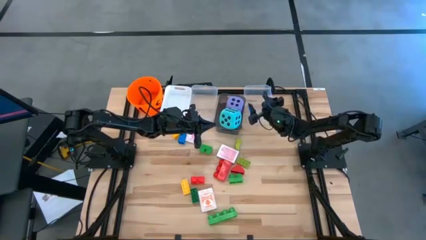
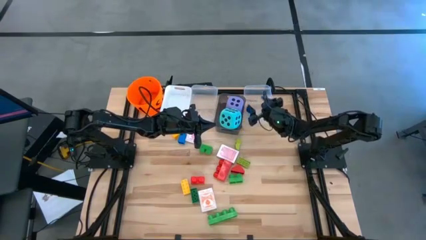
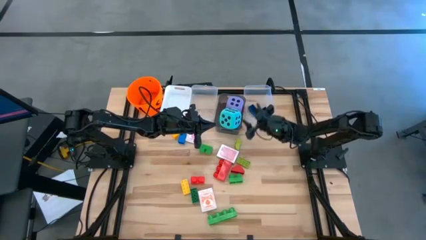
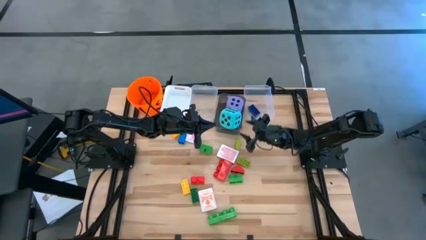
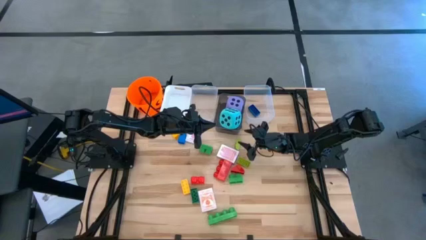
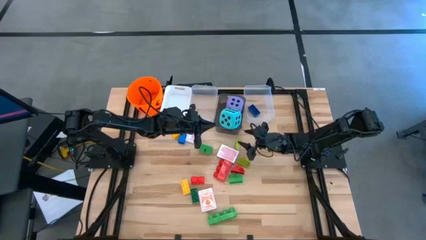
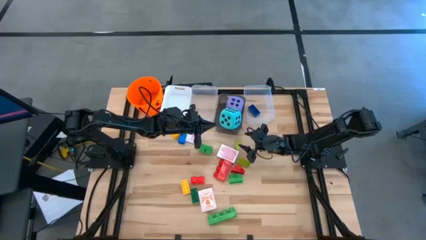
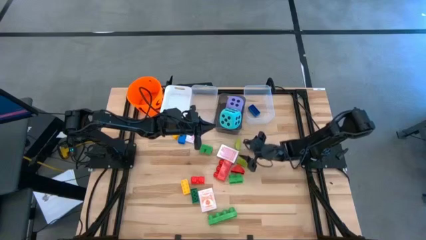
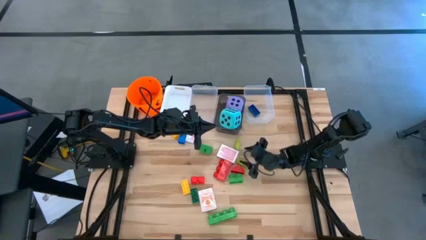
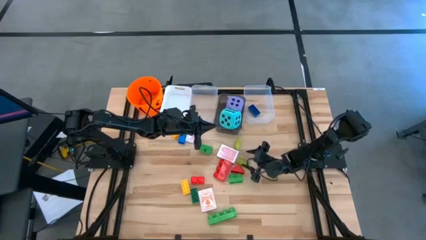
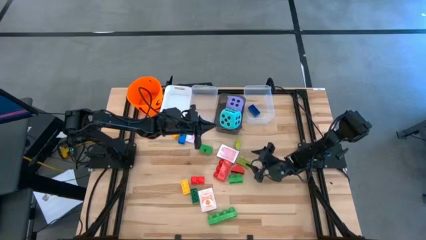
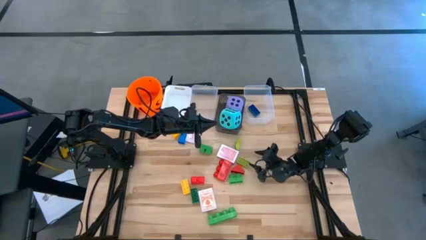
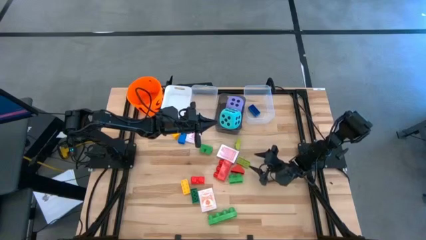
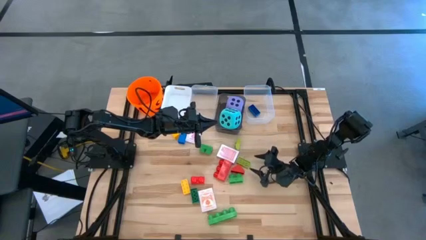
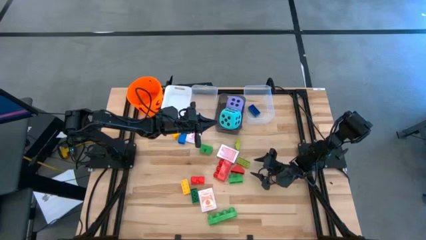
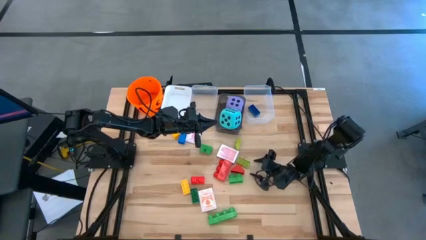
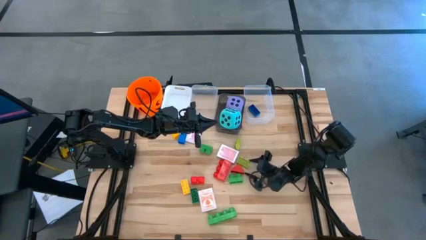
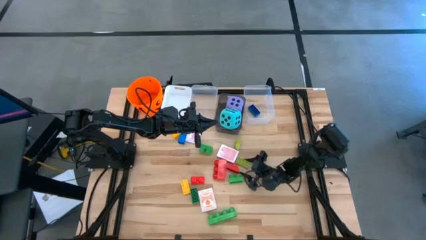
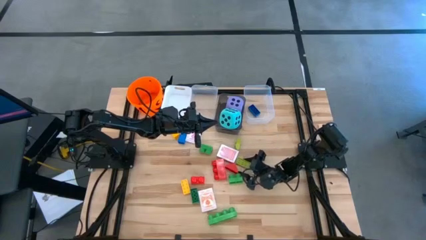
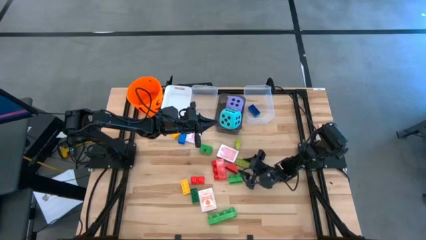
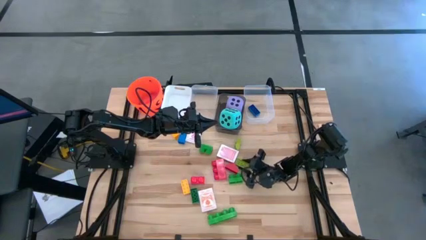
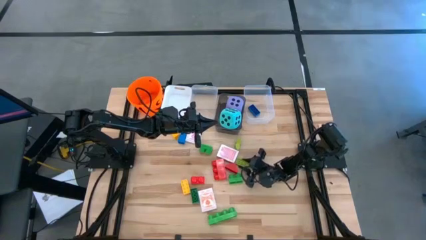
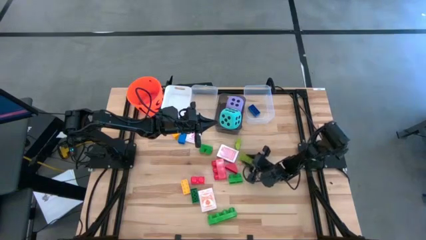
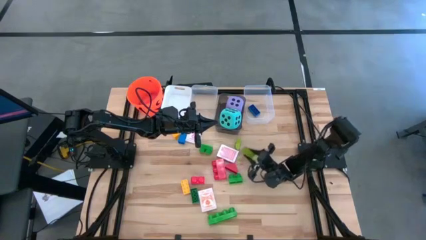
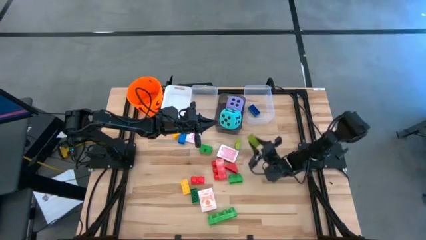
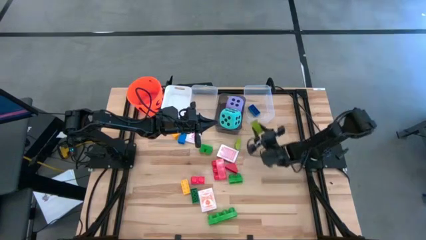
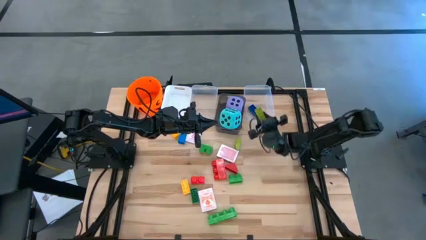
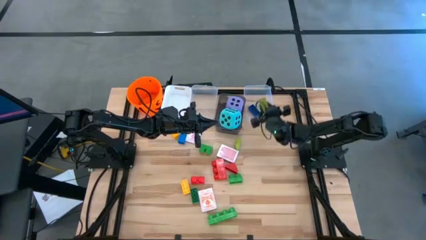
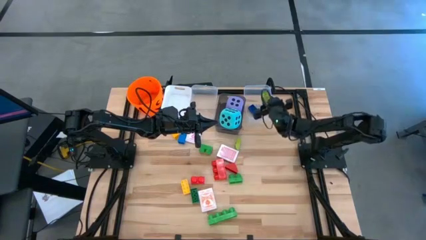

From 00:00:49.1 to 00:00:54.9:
Task: Pick & Place Toys
Put the bottom small light green game piece into the right transparent bin

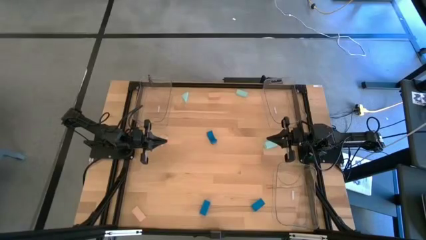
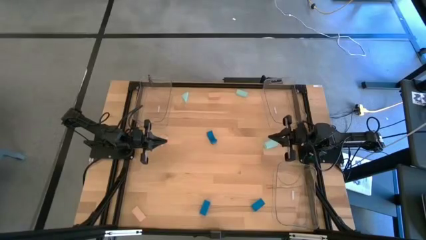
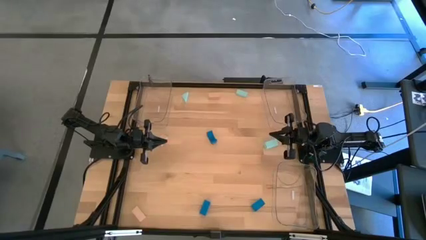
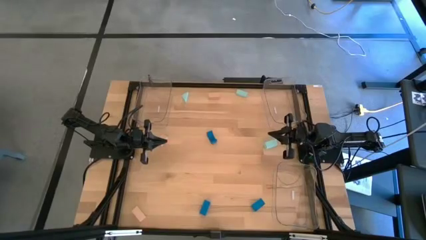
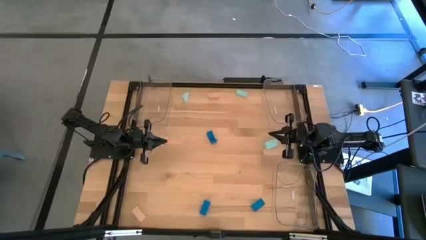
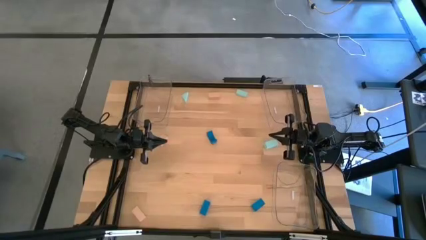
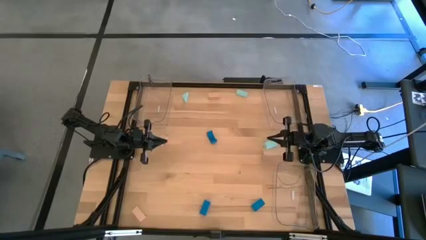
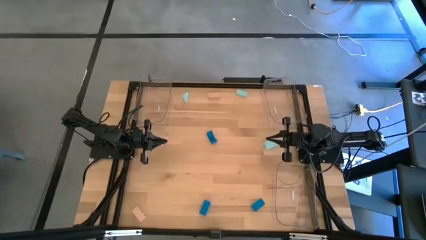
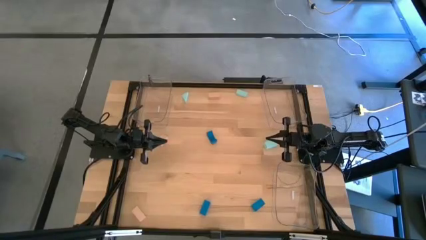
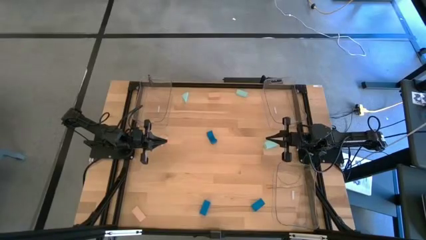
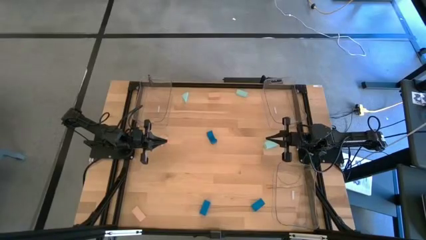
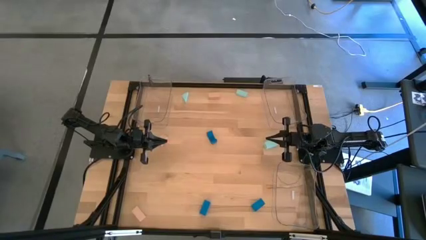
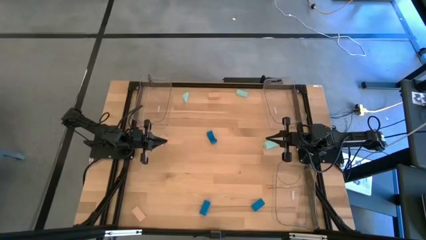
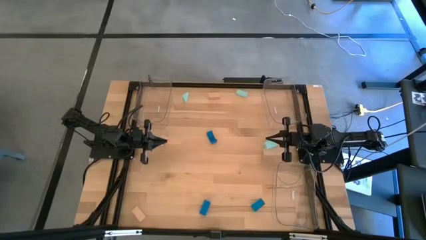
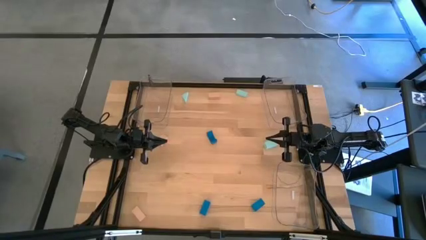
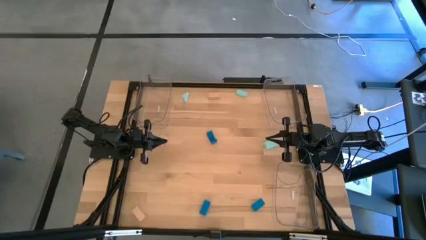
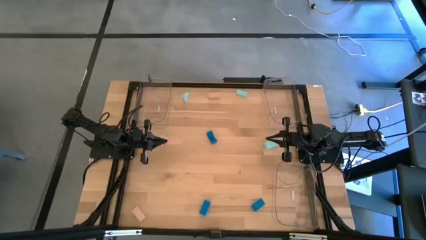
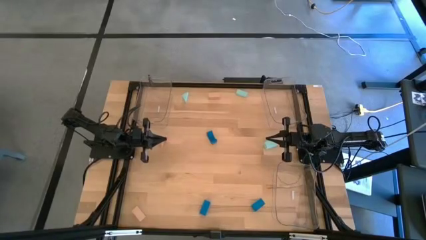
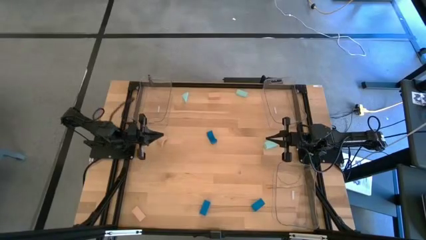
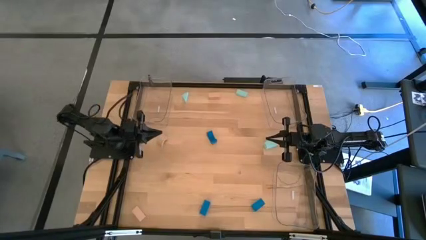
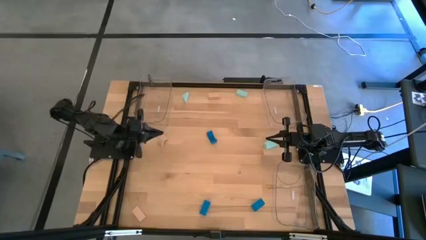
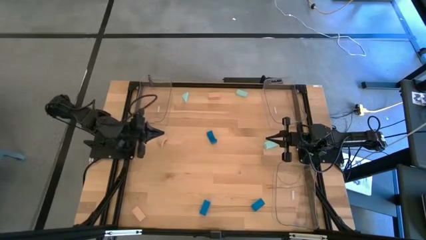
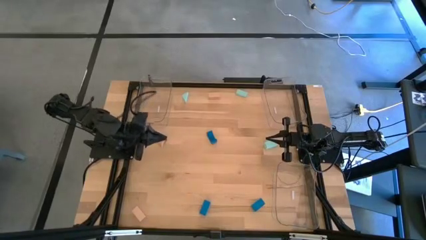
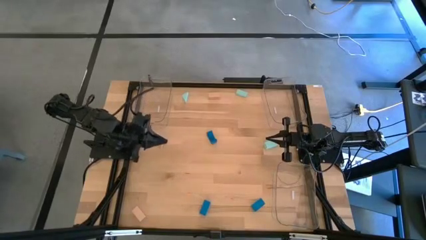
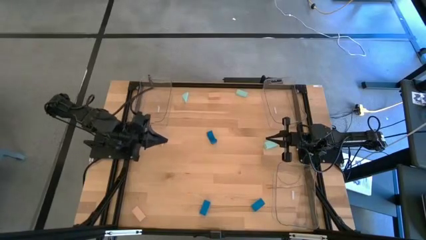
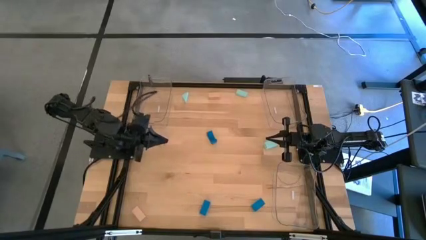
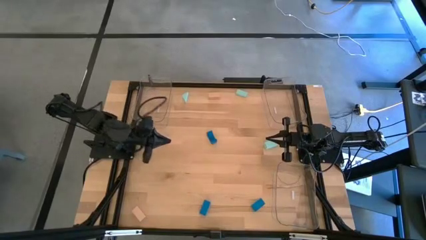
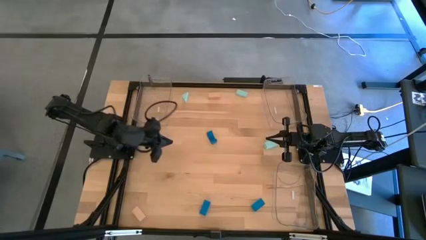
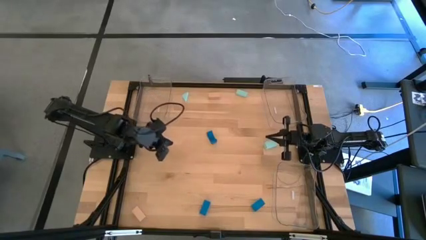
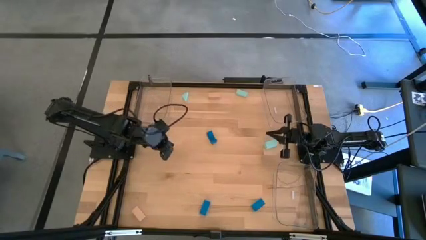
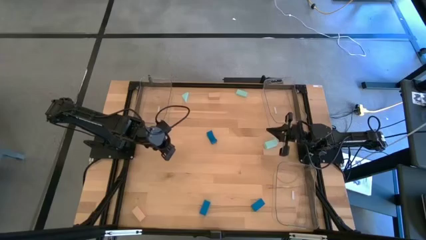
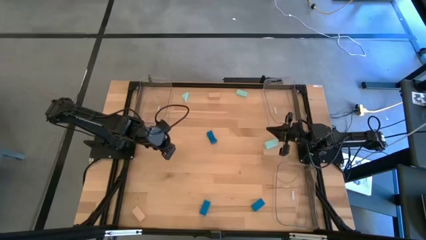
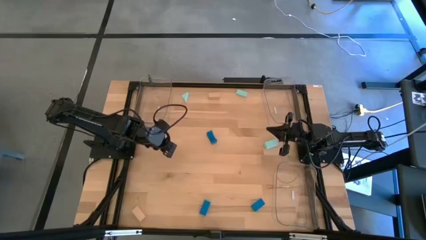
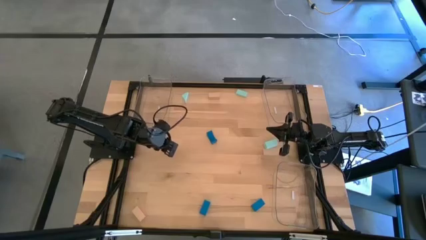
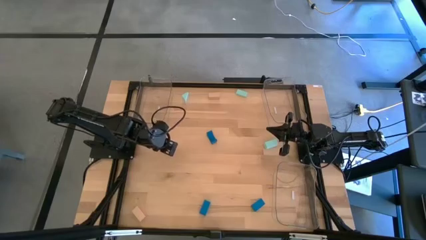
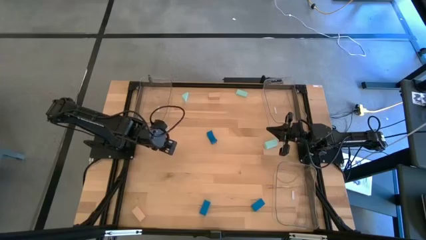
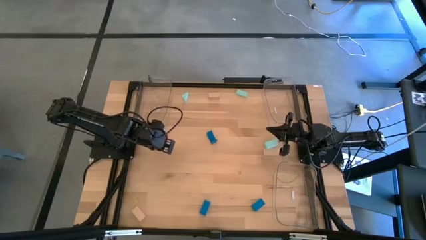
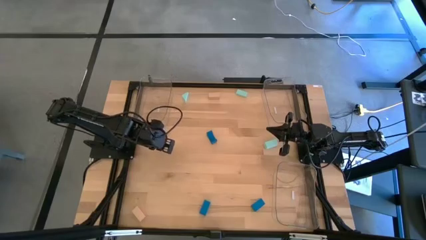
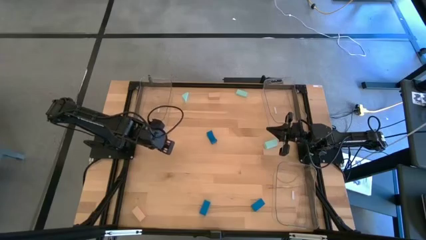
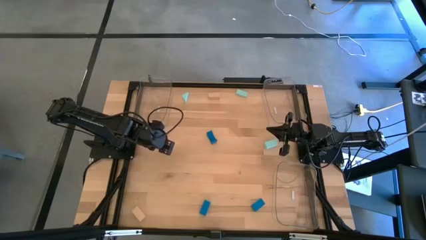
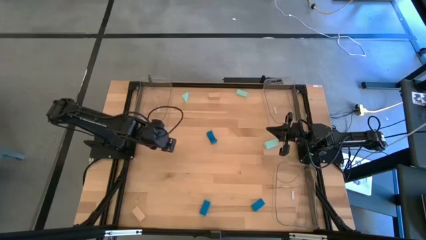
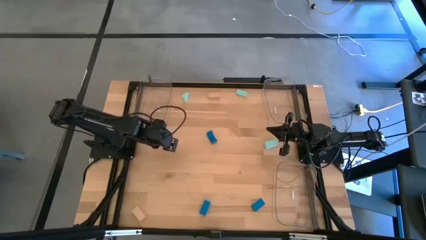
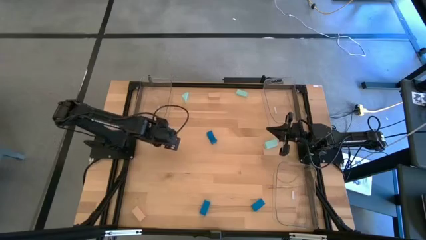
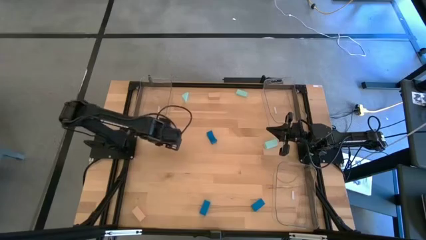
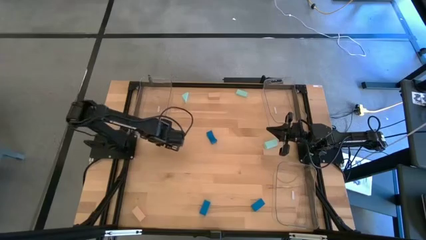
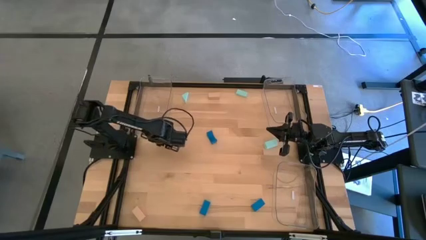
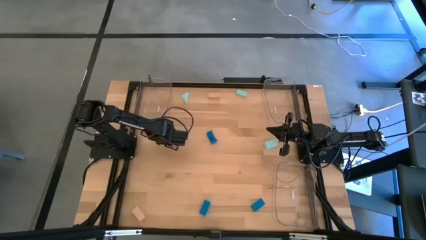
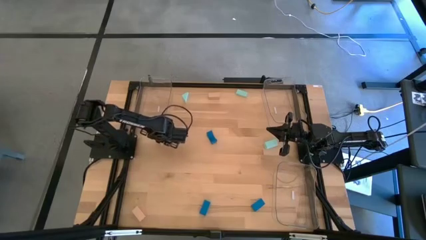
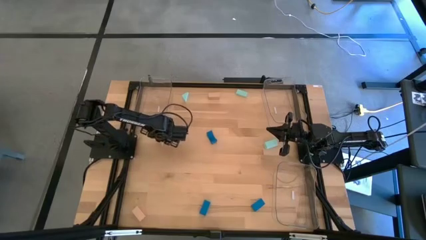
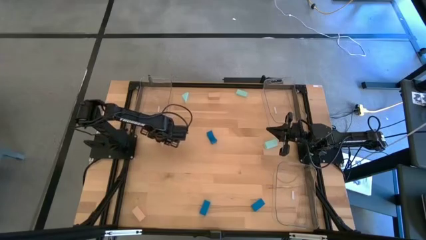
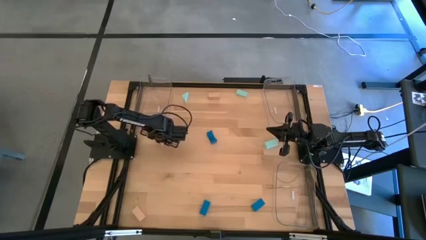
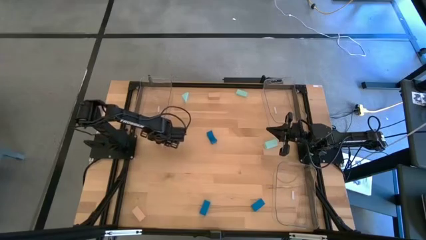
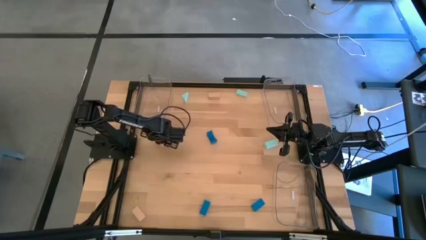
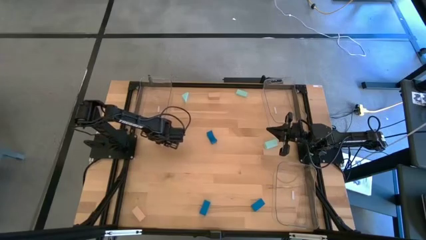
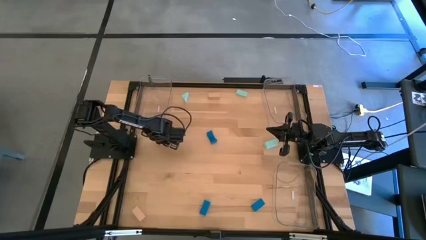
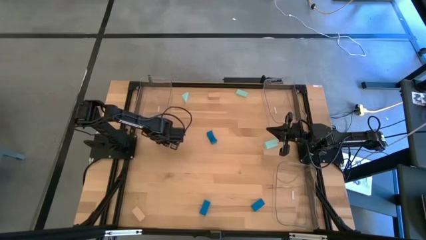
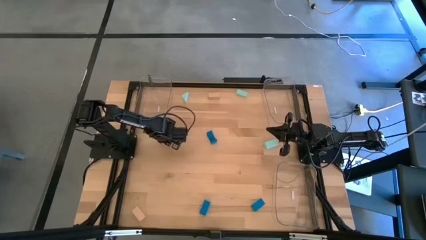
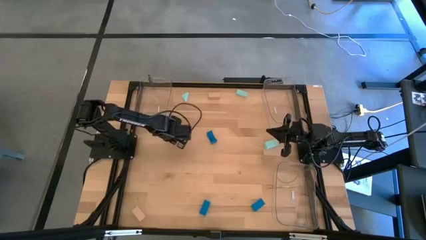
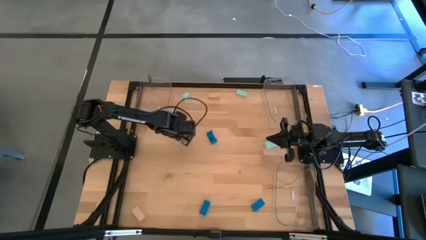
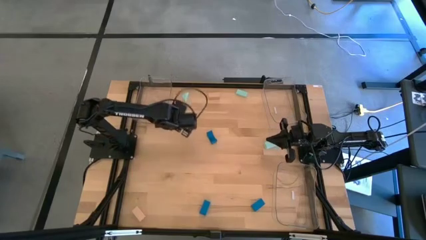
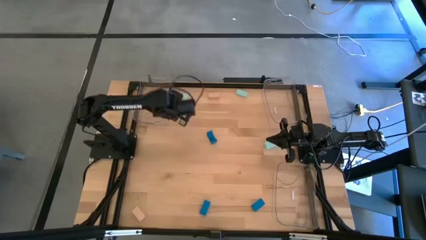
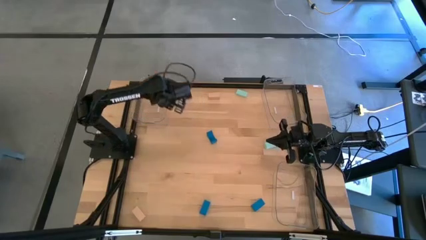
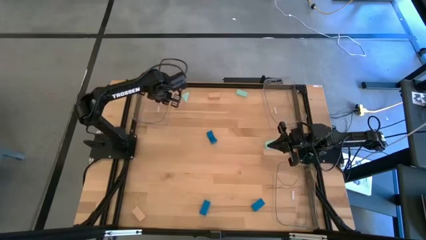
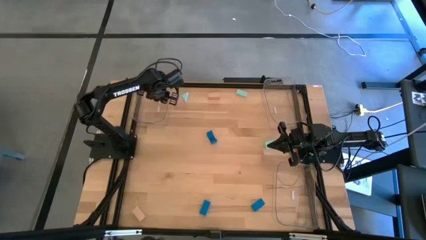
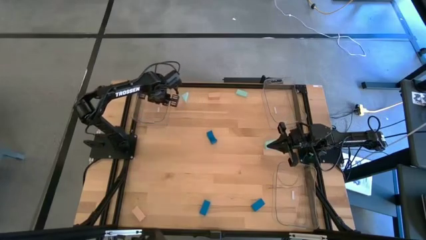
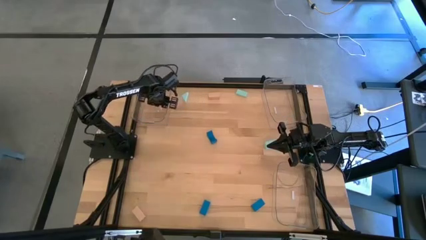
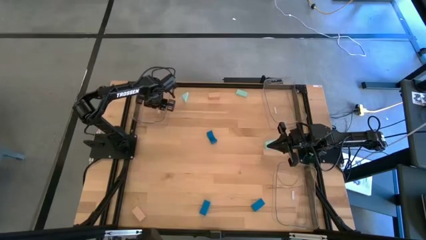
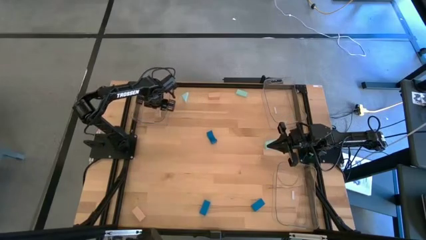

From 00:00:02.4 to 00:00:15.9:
Task: Sort & place blocks by color
Put the middle left brown block into the top left transparent bin
